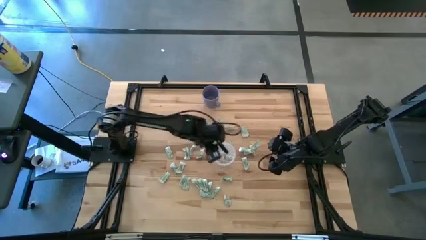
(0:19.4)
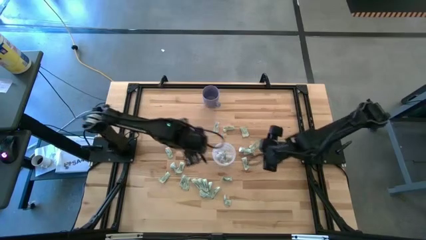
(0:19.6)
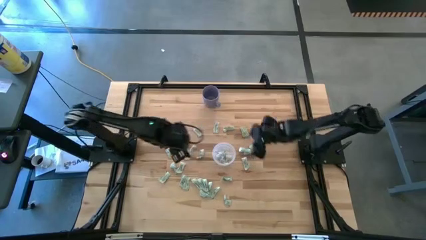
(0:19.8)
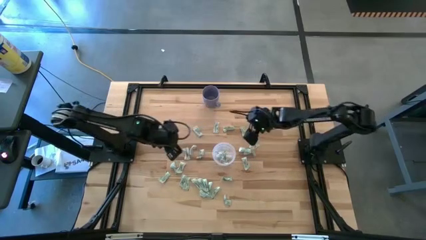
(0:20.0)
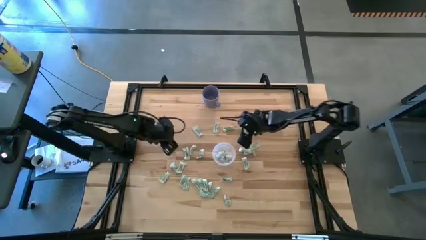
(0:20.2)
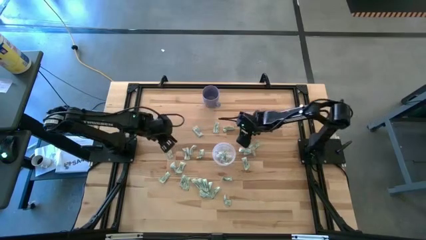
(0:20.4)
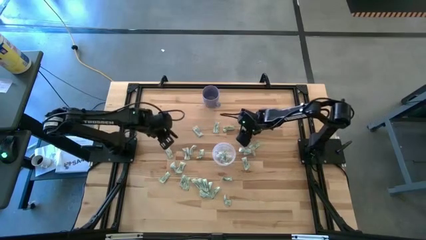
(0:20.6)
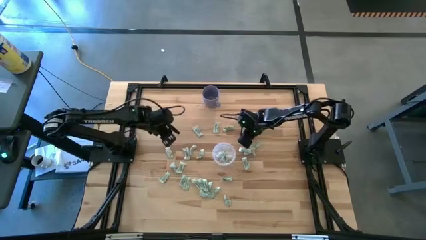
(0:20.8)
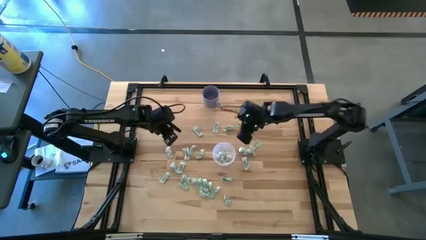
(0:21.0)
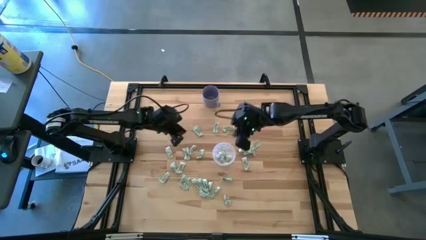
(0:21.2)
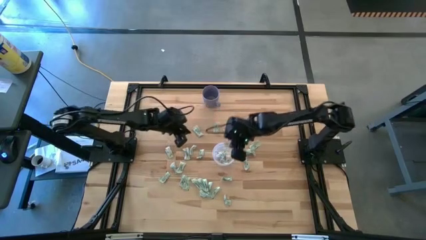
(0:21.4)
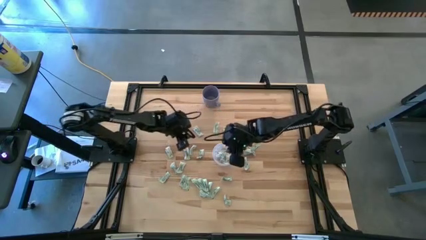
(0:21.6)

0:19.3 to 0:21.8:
Task: Pick and place Stevia / Truvia into bins
Put the stevia packet into the transparent container

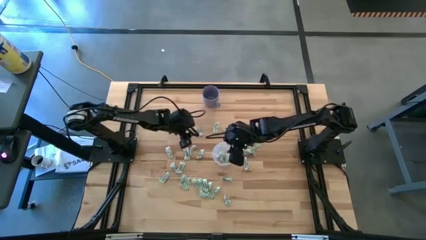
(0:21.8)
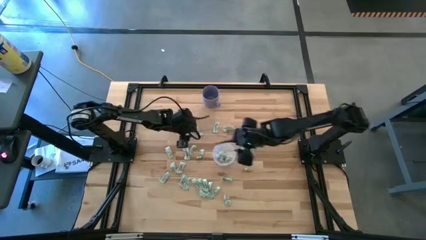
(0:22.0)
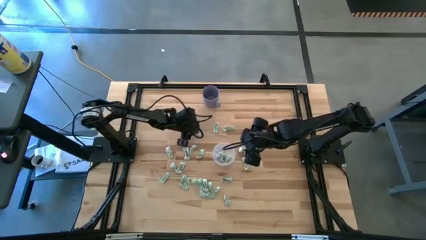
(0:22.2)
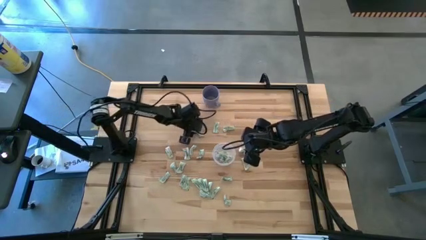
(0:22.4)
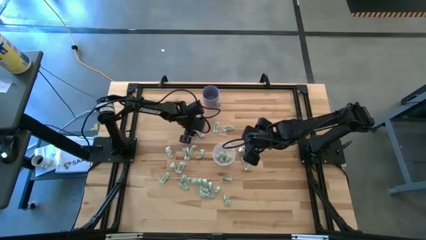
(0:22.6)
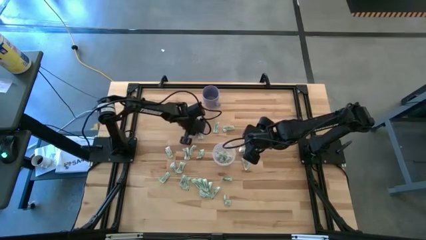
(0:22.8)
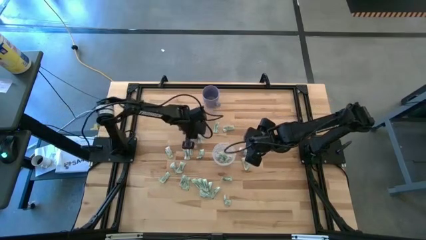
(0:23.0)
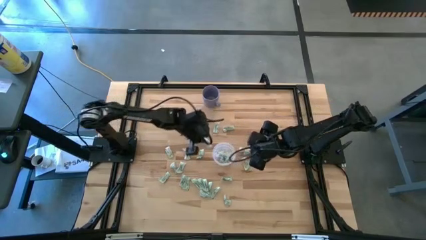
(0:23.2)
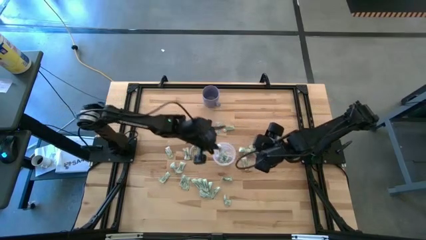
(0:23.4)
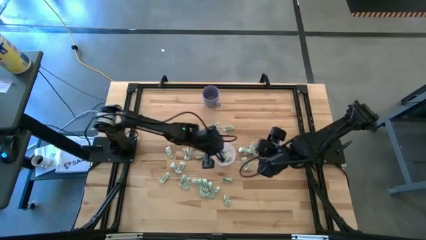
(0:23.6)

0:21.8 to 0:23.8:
Put the stevia packet into the transparent container

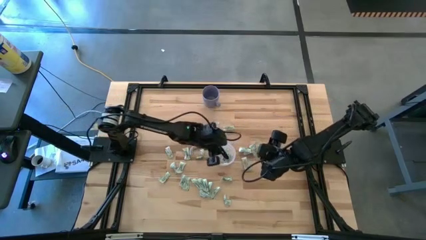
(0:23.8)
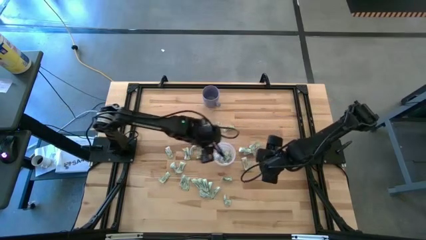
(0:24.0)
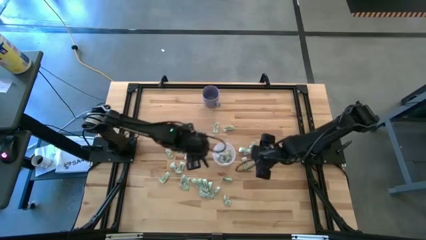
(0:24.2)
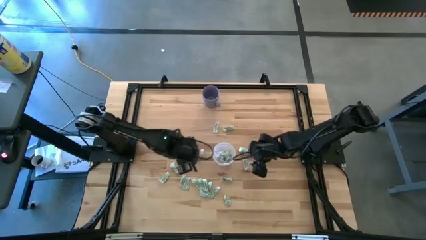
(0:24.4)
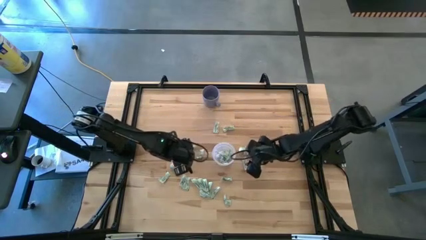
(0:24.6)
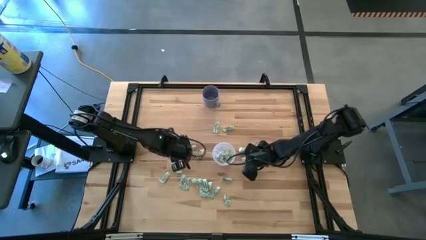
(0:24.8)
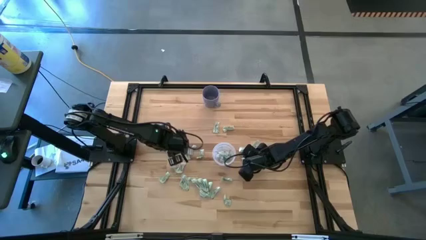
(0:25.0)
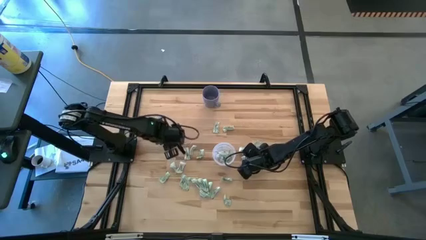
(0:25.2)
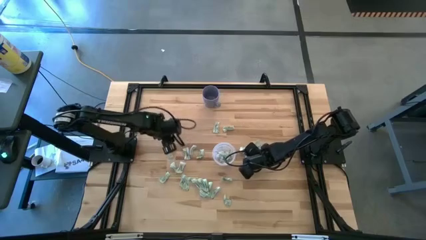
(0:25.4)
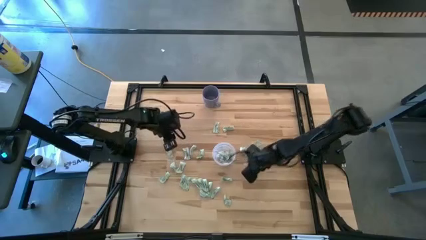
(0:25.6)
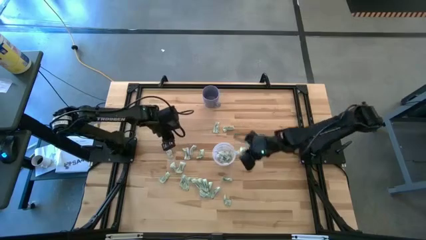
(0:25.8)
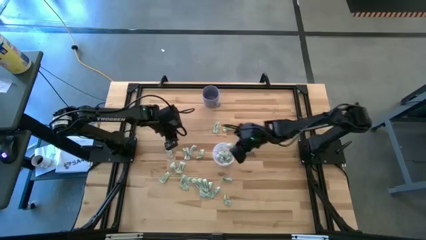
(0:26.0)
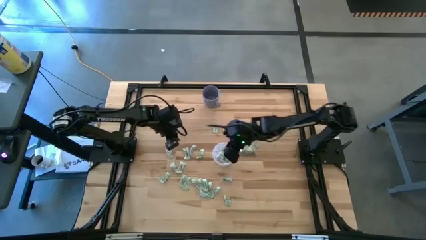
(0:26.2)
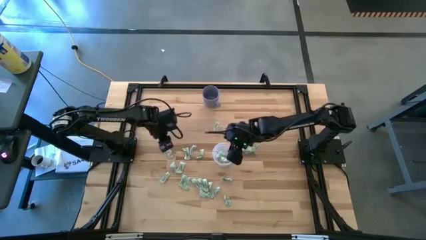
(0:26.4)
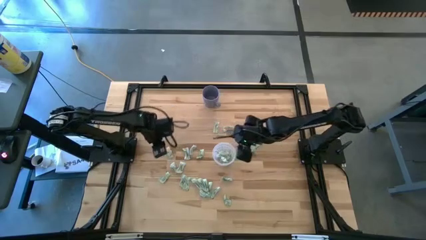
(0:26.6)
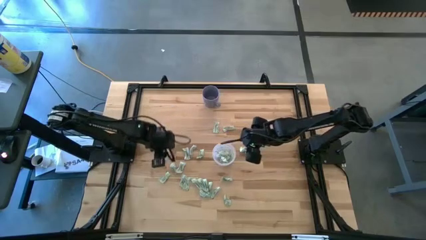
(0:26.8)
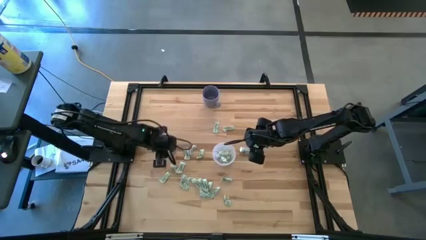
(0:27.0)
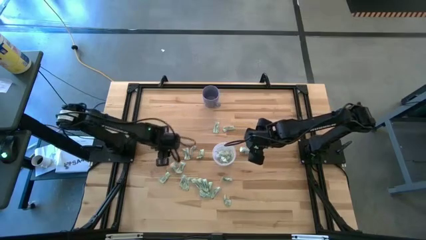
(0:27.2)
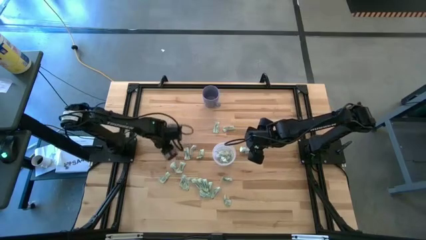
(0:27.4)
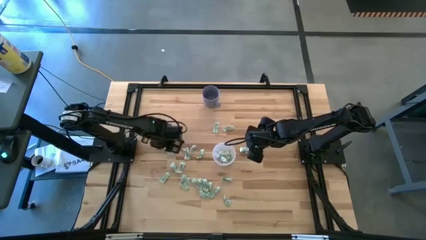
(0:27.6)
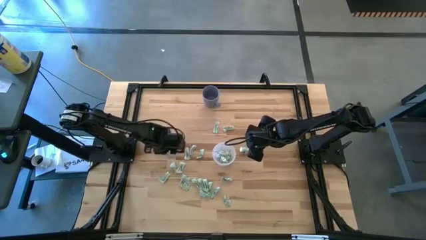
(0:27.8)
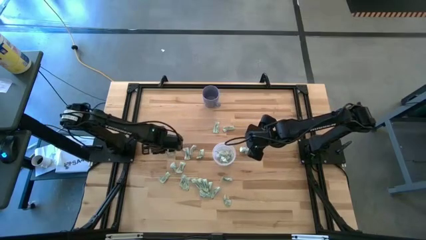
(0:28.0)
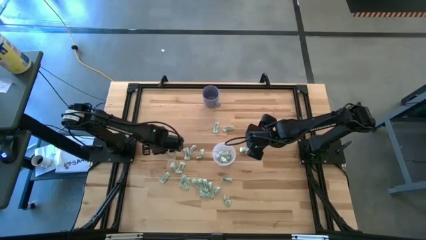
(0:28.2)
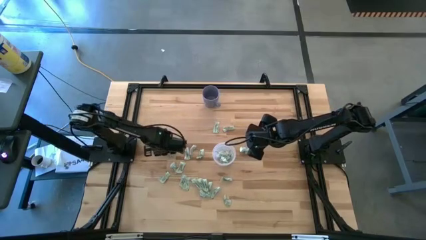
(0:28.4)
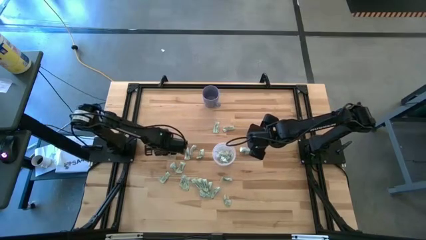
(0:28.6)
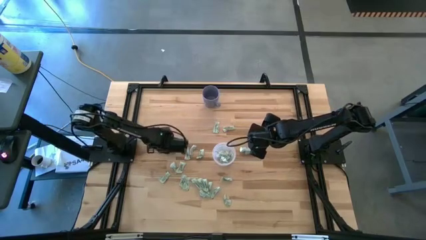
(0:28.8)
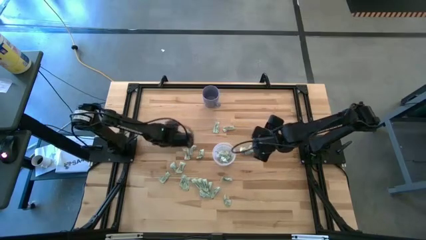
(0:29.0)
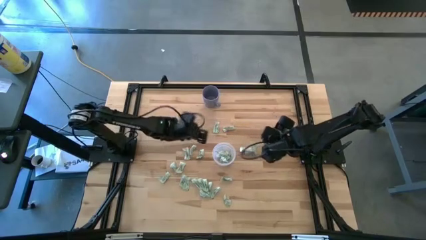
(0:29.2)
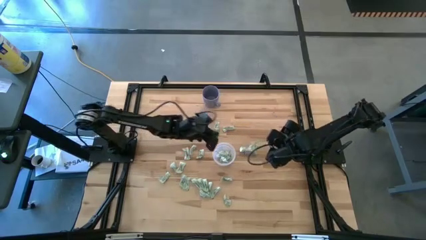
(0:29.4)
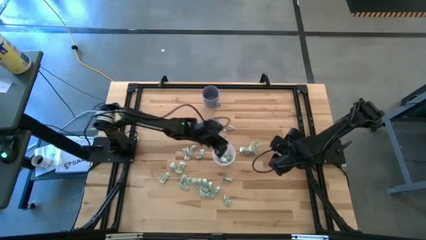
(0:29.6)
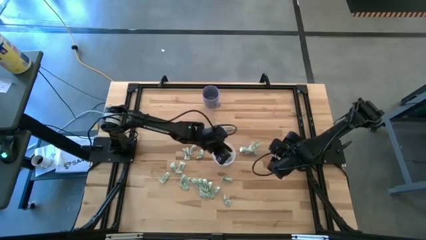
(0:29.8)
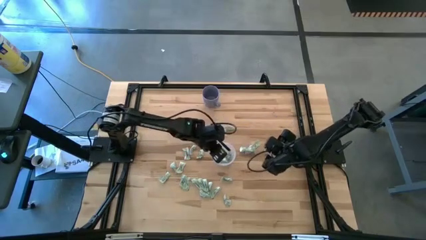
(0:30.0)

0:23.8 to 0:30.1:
Put the stevia packet into the transparent container

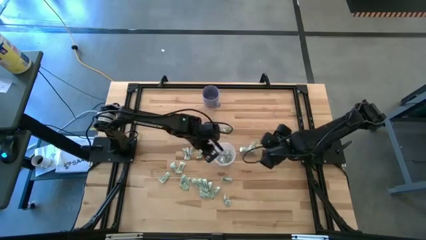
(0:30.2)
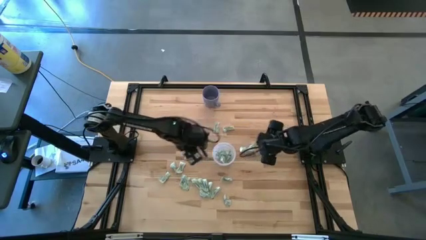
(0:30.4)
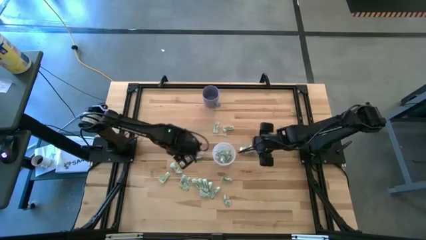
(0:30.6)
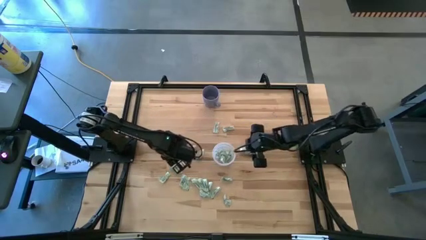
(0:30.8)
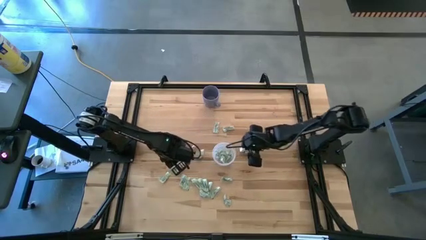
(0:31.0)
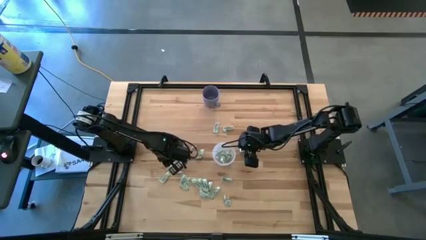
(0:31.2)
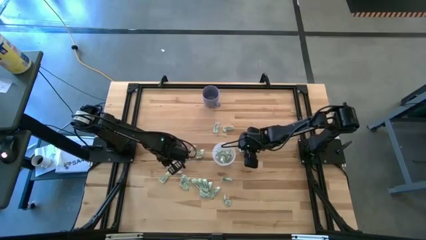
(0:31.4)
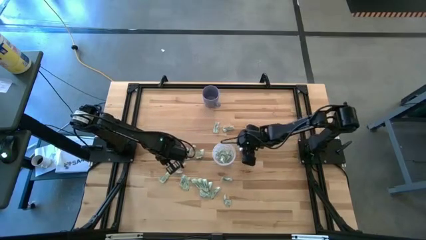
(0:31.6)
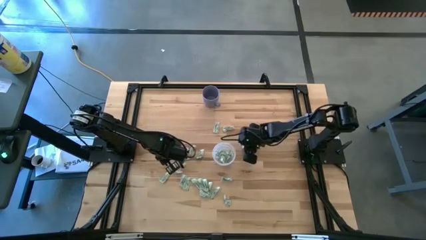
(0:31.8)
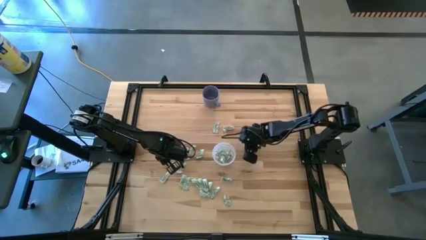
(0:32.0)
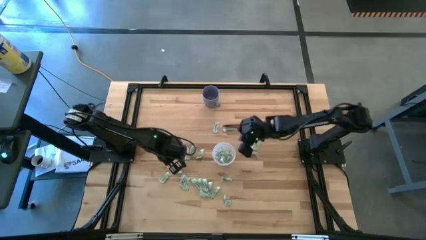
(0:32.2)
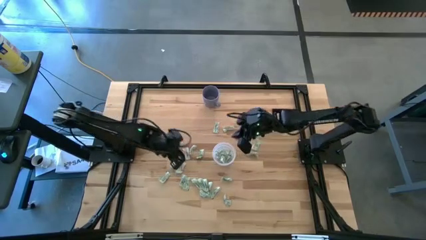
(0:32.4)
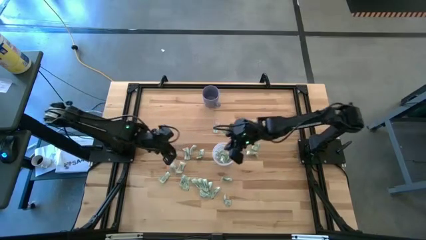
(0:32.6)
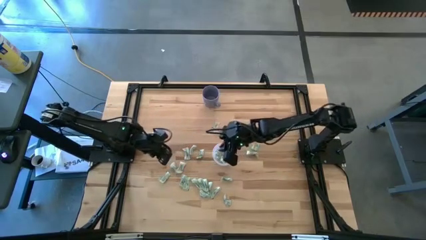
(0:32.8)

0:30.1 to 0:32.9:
Put the stevia packet into the transparent container

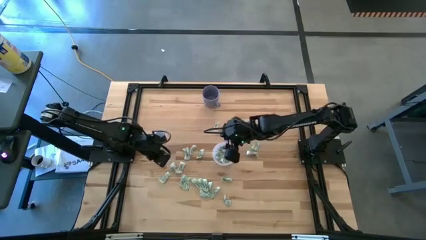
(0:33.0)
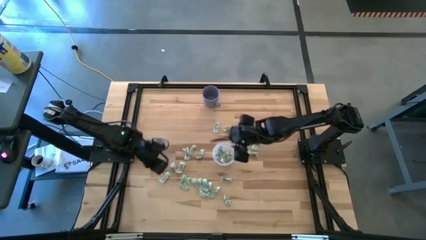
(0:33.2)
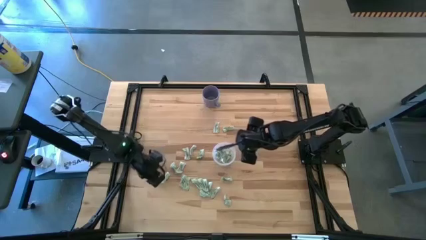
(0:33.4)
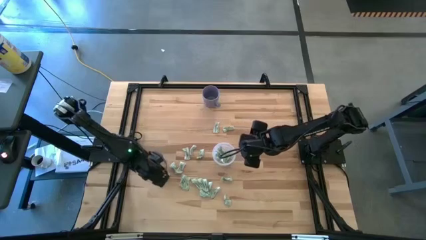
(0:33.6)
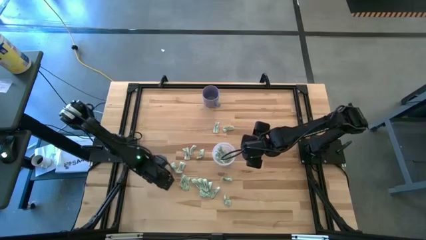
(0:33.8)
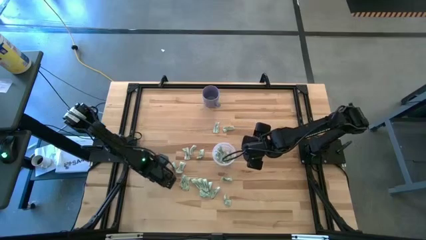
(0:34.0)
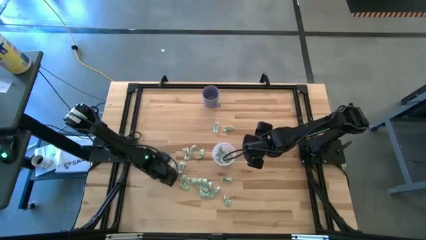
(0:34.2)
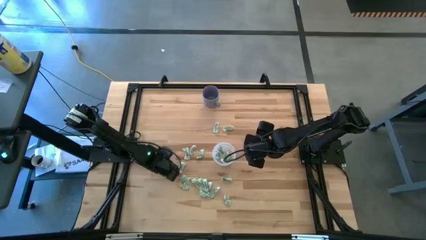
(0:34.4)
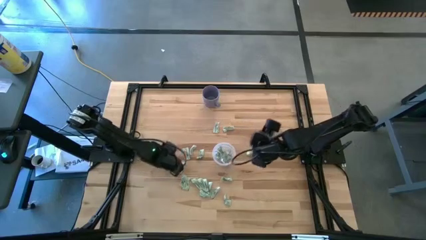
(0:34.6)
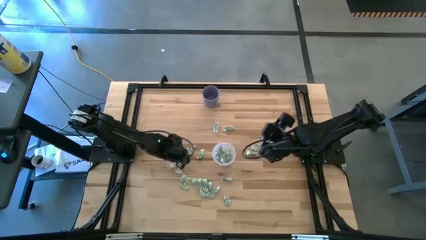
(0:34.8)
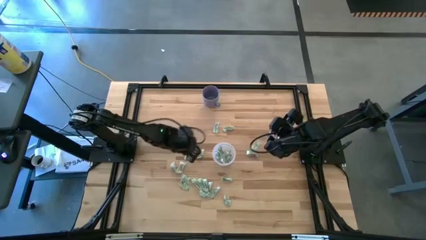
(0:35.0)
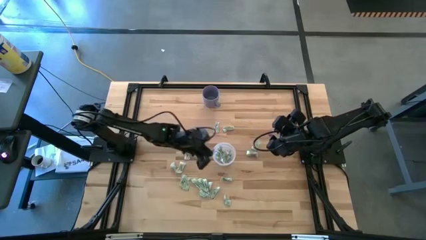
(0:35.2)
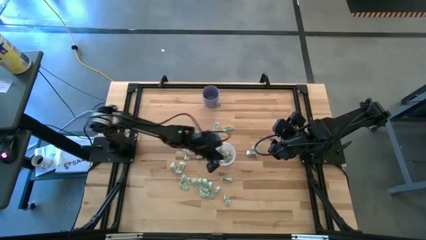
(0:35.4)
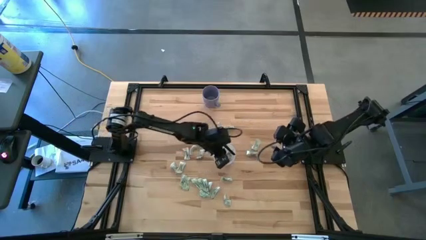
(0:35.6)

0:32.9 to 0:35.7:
Put the stevia packet into the transparent container

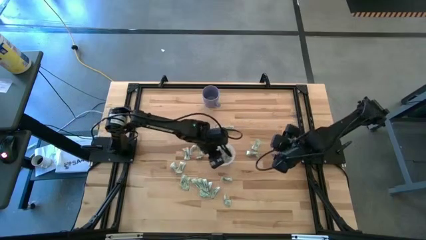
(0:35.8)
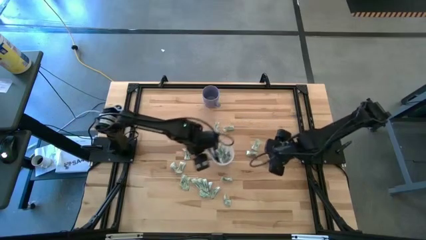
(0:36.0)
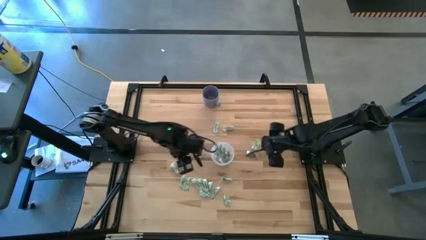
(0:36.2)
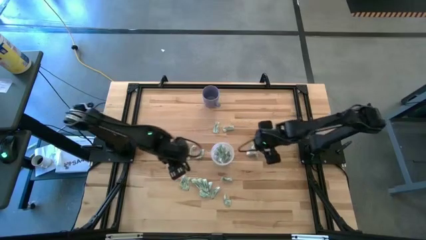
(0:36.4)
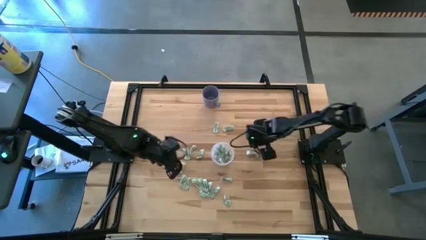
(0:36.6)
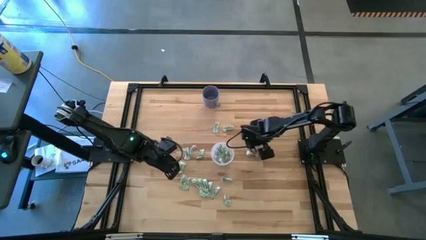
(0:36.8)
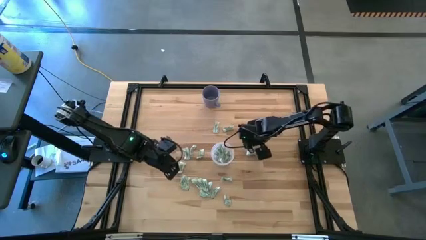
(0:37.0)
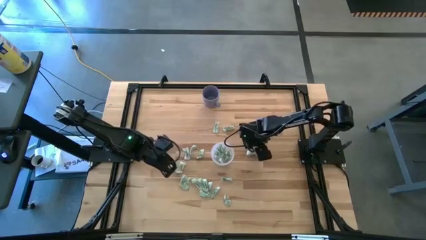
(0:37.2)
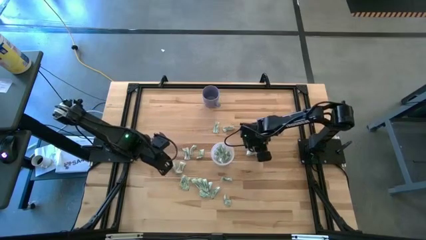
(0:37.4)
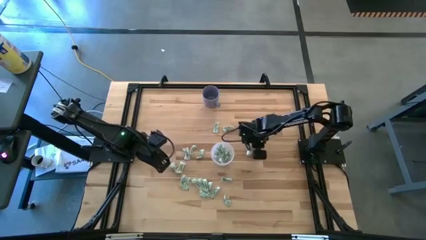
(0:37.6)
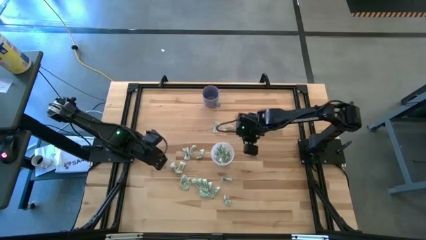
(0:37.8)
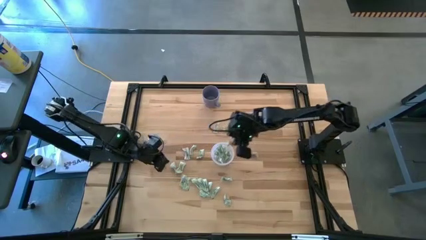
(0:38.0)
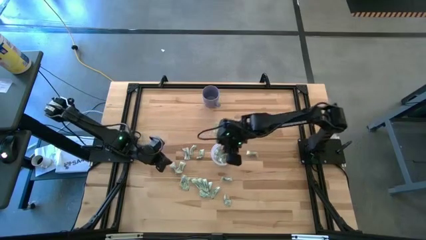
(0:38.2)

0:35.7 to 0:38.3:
Put the stevia packet into the transparent container
